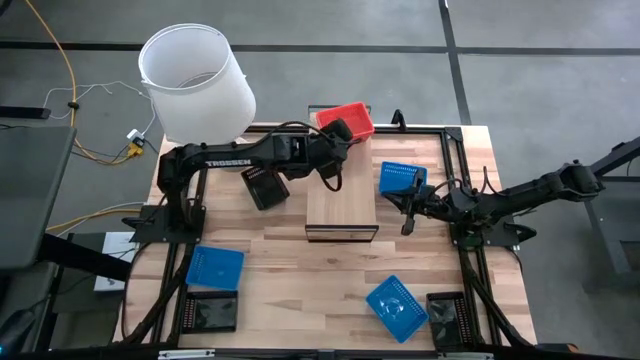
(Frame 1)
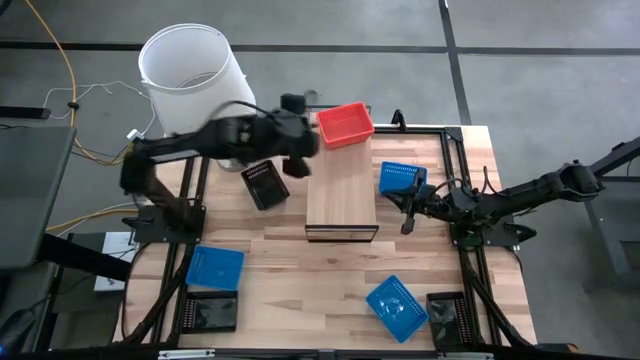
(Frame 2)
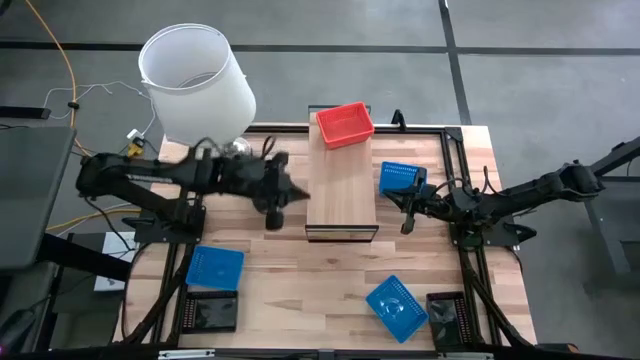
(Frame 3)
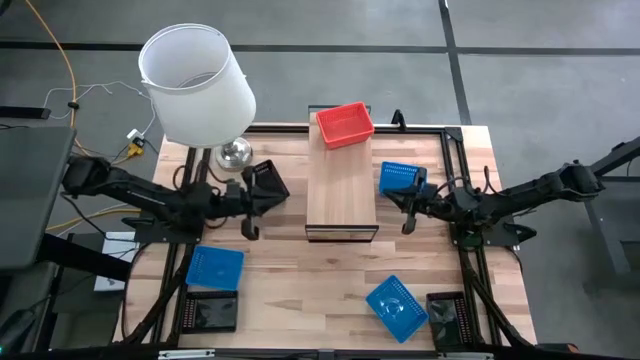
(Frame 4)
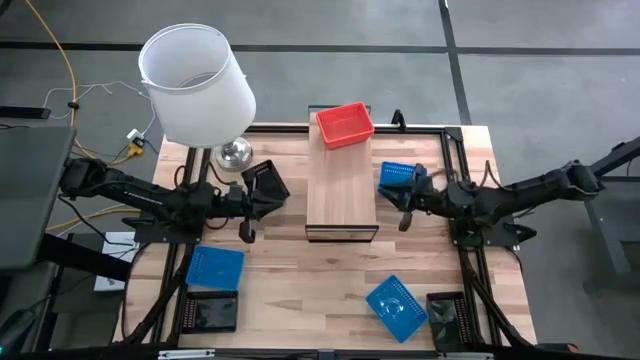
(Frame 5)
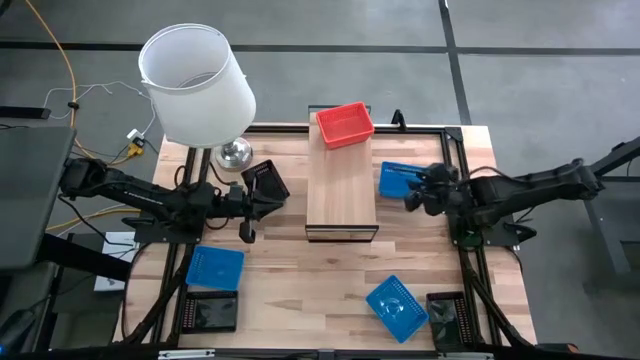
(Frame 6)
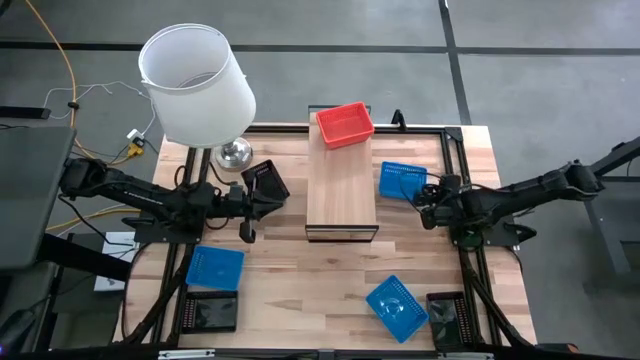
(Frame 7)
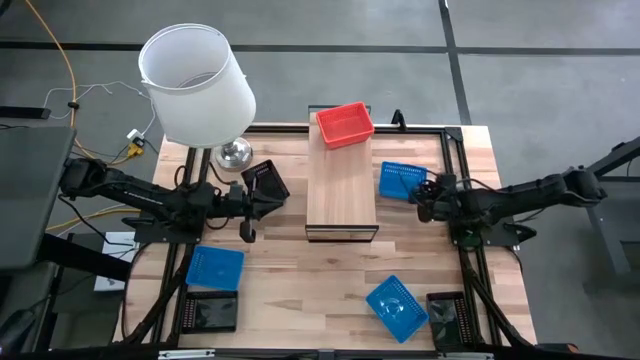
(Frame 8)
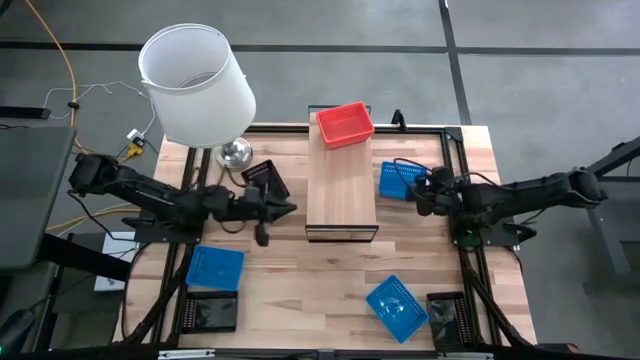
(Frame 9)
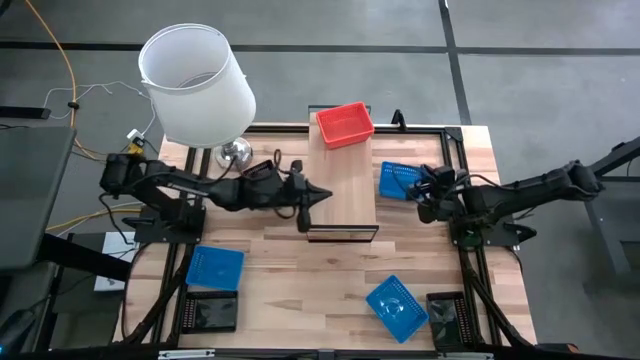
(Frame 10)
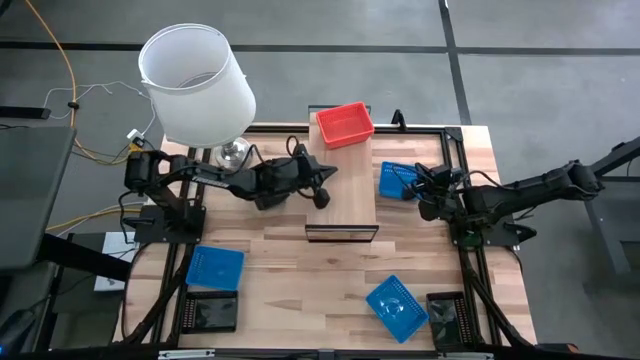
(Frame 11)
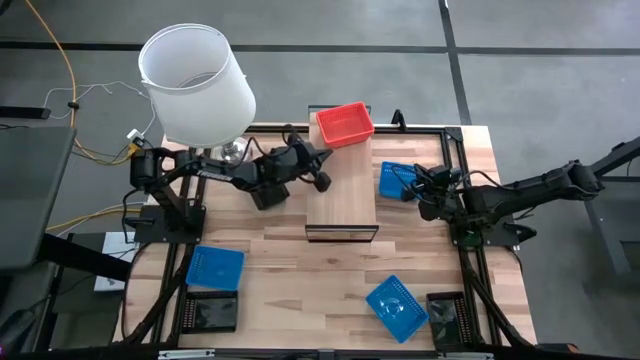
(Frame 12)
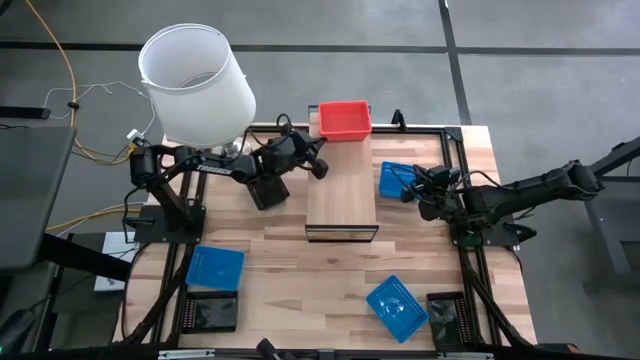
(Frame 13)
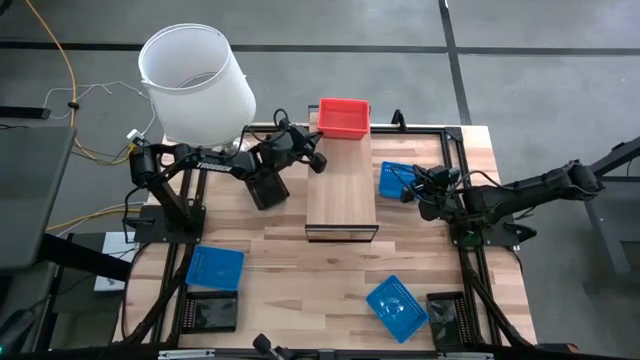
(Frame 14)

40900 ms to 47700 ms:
Task: Stack baskets on shelf by color
Adjust the stacked orange bin on the shelf

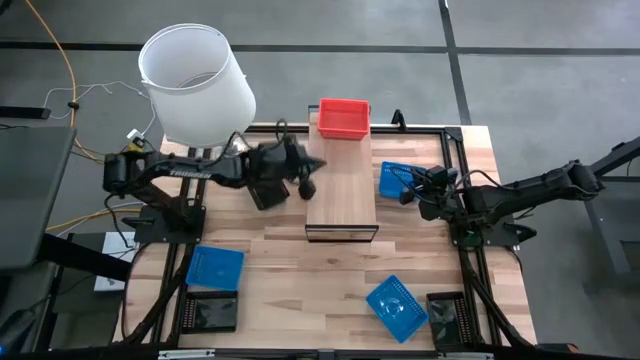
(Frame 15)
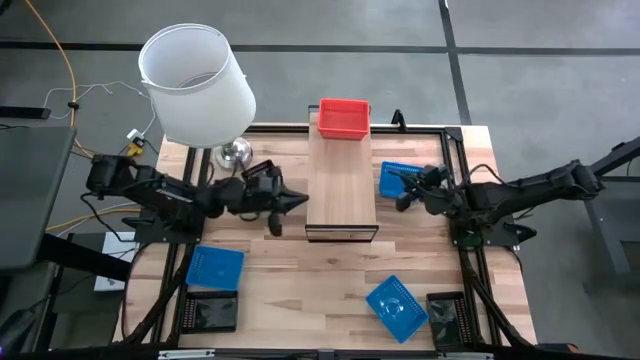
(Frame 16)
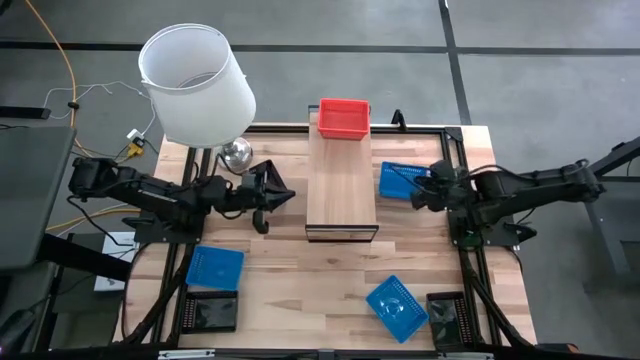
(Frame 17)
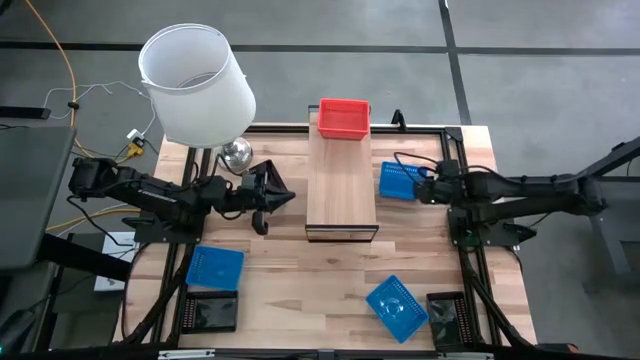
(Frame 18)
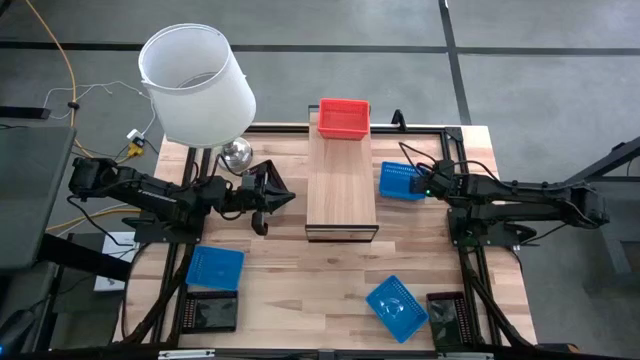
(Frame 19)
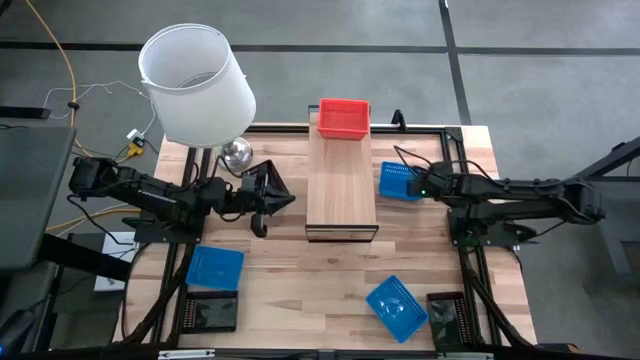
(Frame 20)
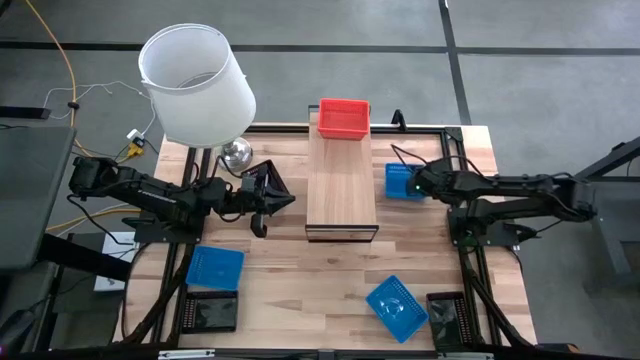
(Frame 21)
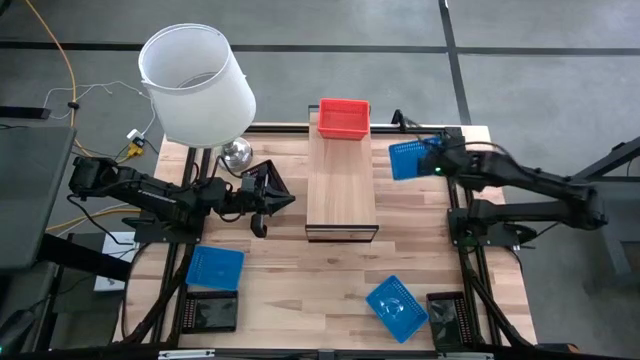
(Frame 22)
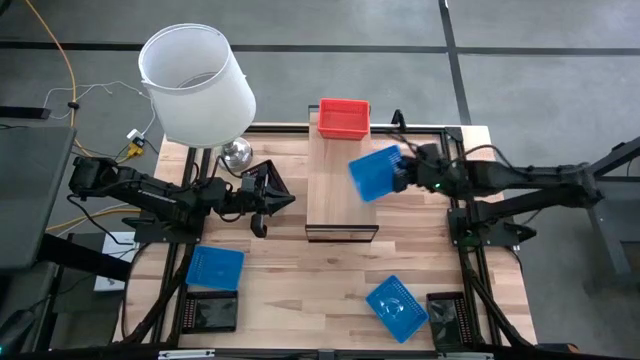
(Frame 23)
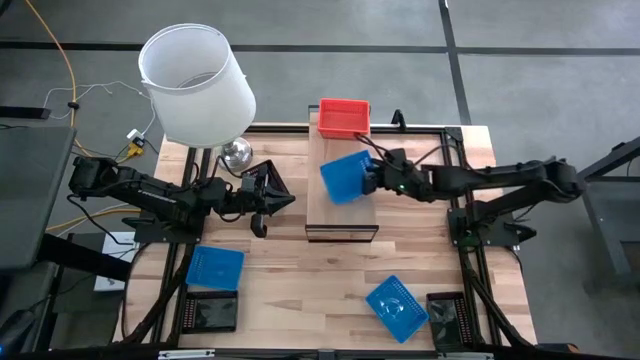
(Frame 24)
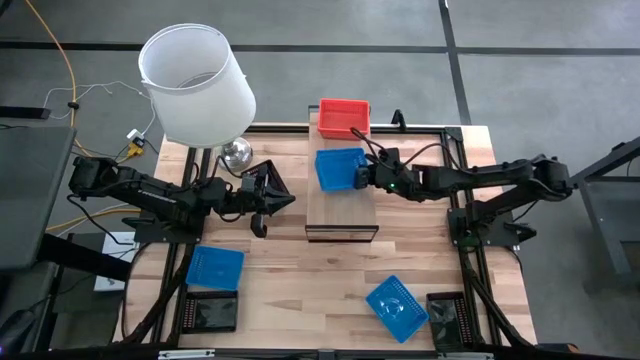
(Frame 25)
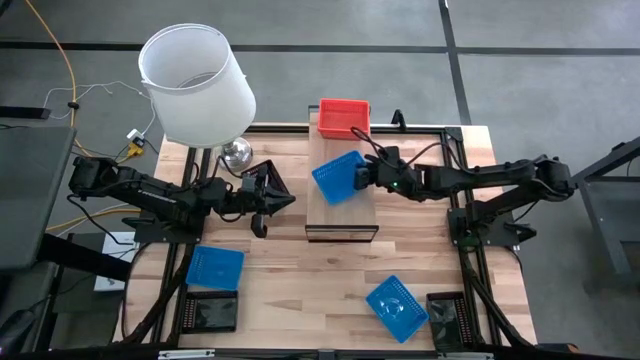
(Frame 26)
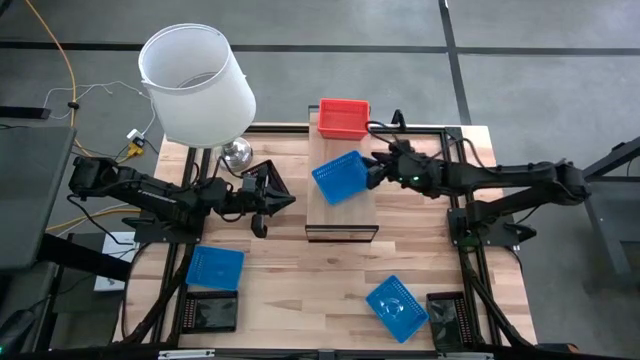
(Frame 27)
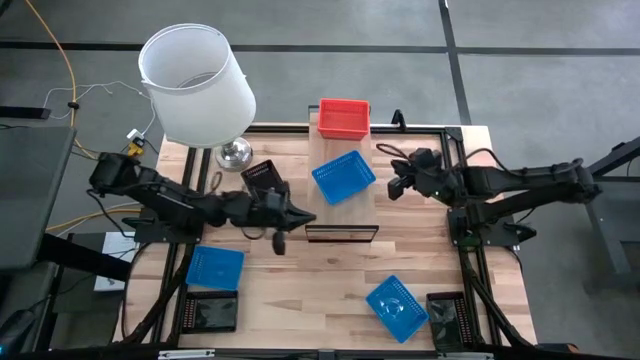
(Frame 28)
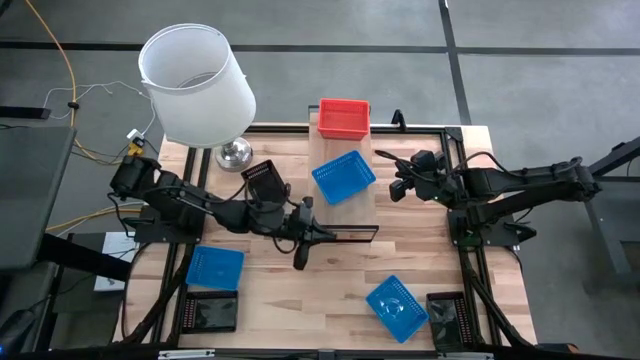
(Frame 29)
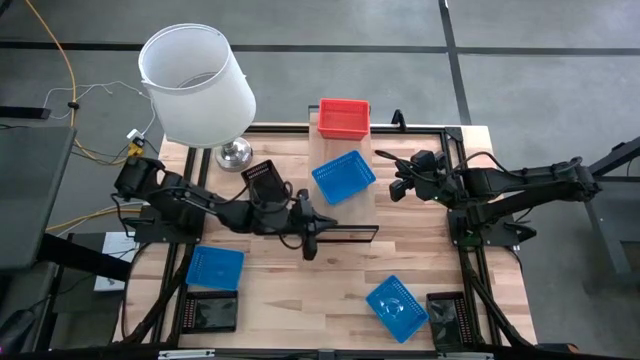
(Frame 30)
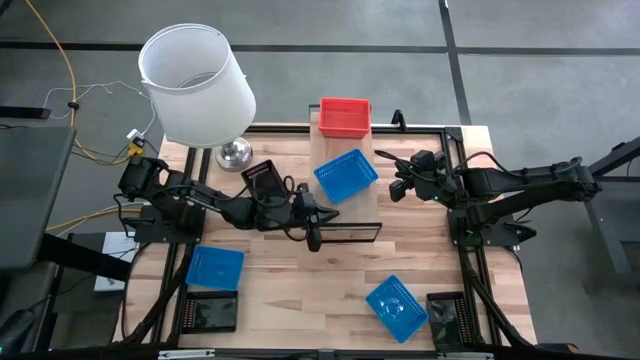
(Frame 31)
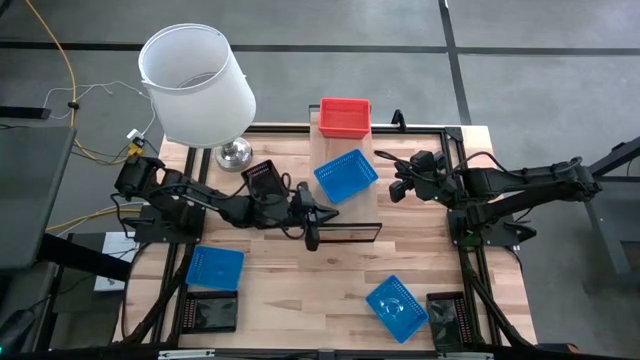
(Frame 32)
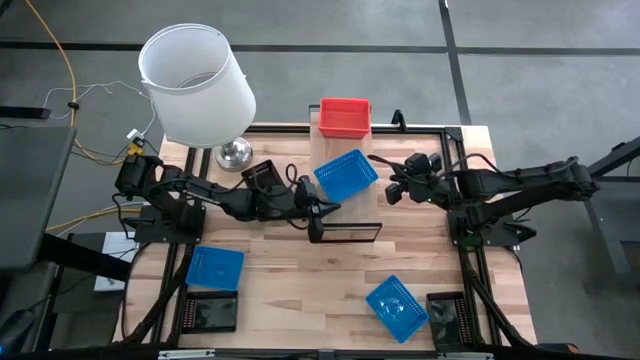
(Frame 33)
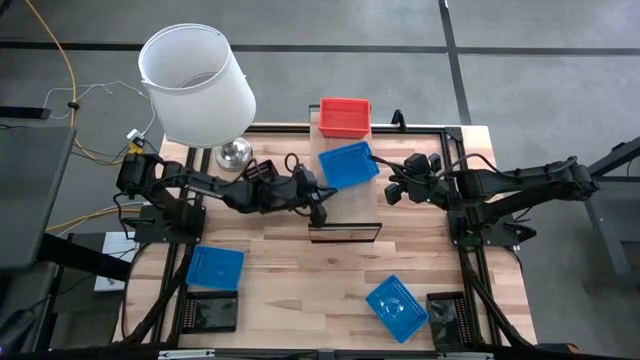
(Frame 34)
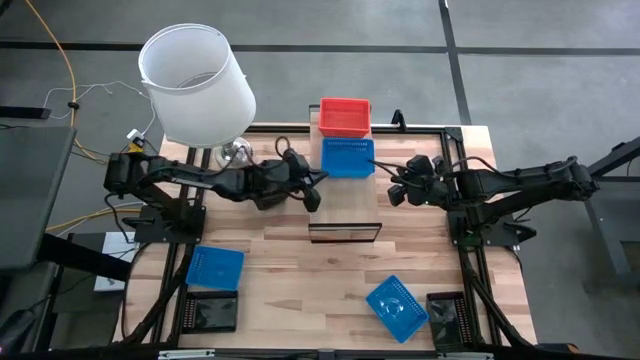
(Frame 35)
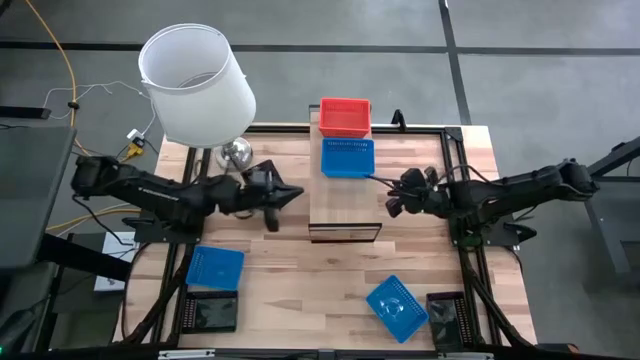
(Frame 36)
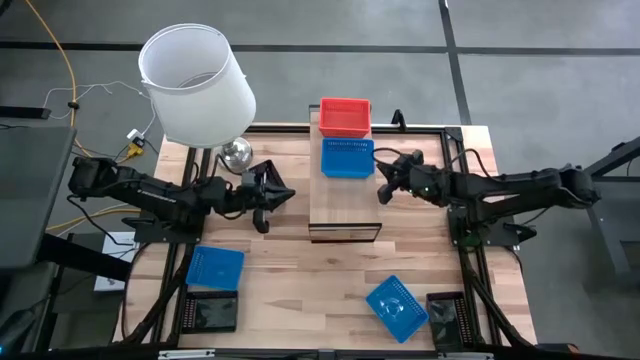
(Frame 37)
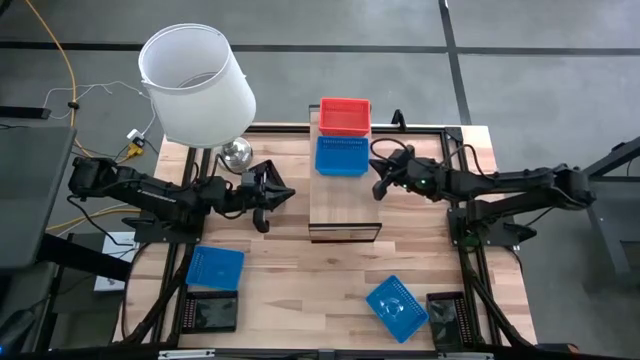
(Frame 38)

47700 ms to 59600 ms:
Put the top blue bin on the shelf

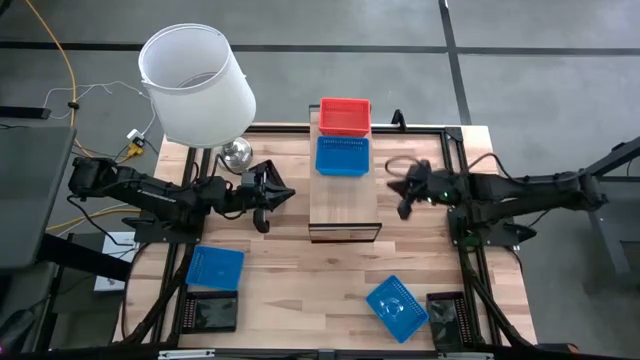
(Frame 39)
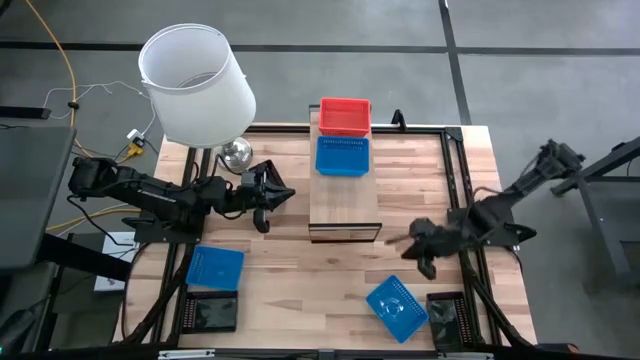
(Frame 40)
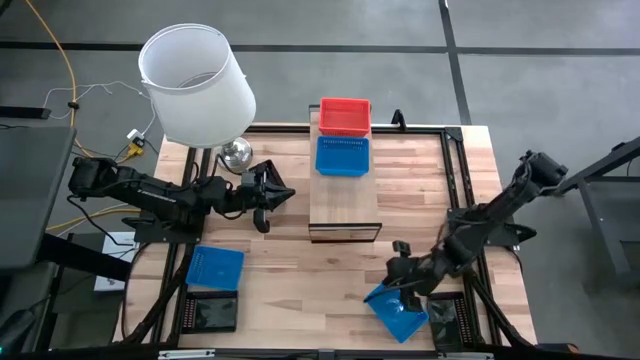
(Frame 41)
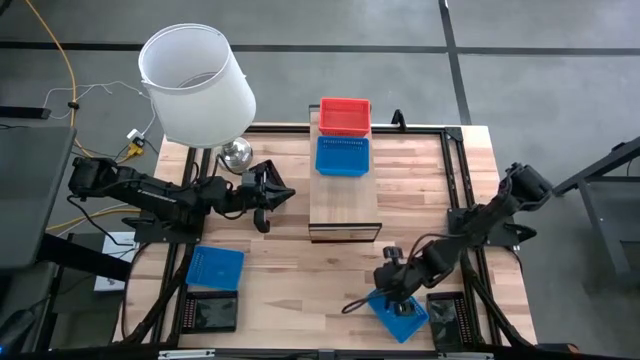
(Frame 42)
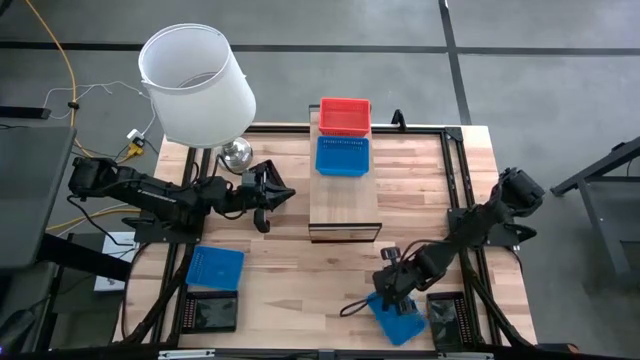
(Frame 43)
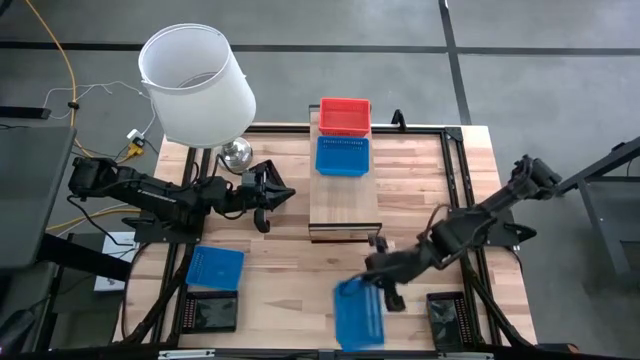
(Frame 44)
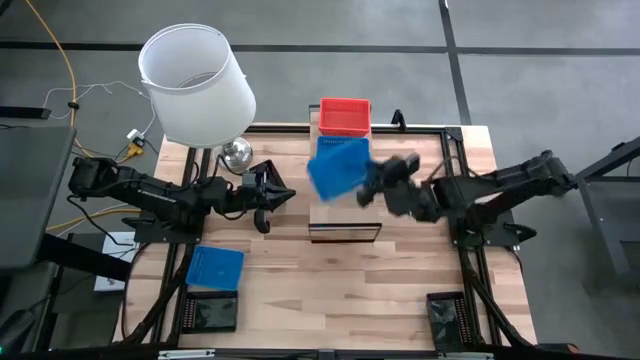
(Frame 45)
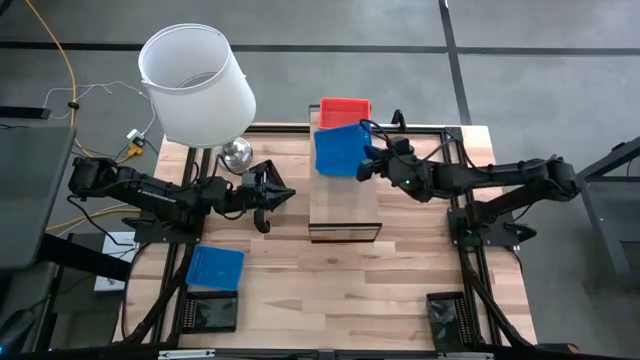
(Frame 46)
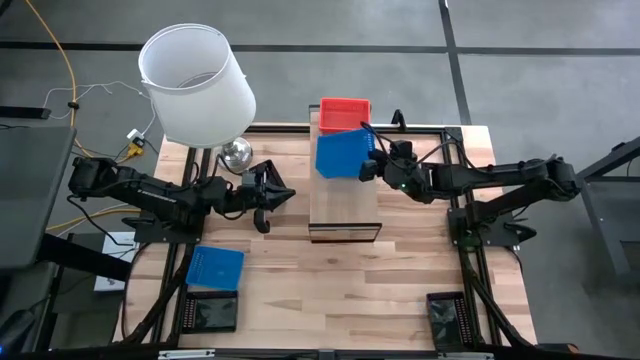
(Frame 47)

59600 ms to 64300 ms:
Stack the right blue bin on top of the blue bin on the shelf
